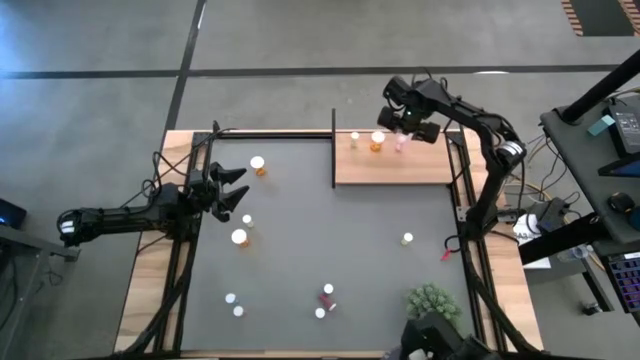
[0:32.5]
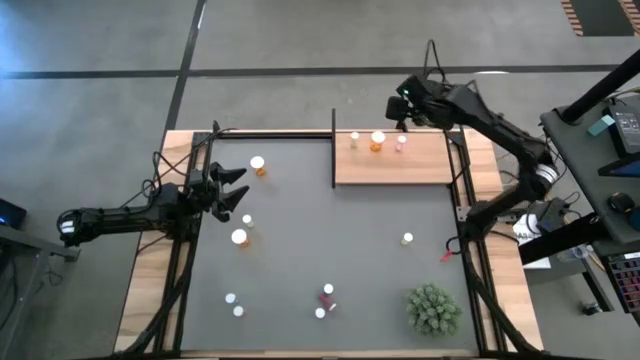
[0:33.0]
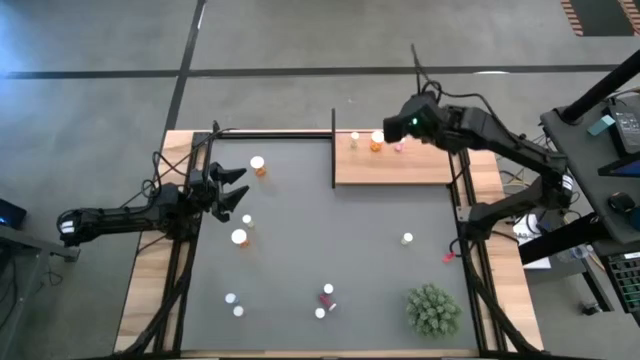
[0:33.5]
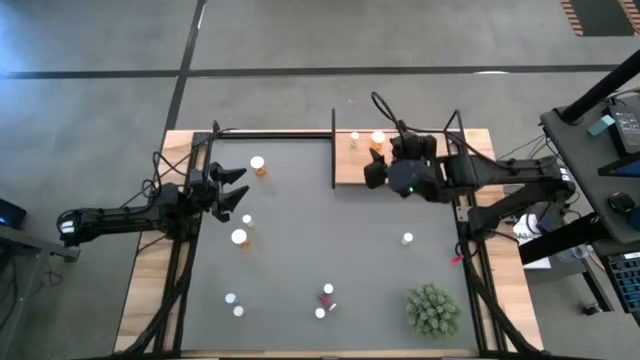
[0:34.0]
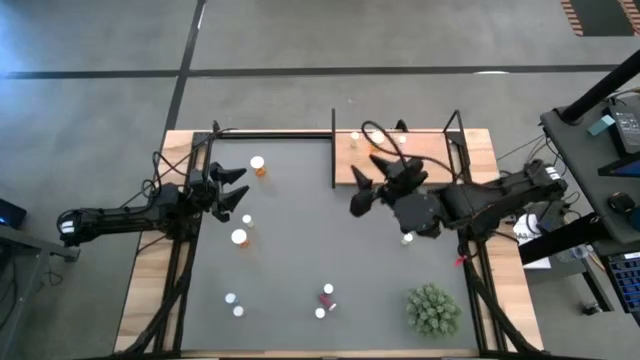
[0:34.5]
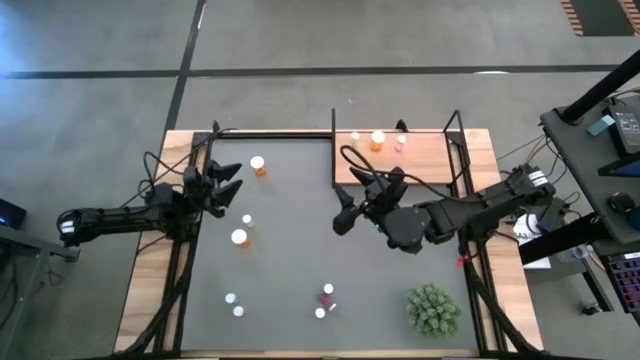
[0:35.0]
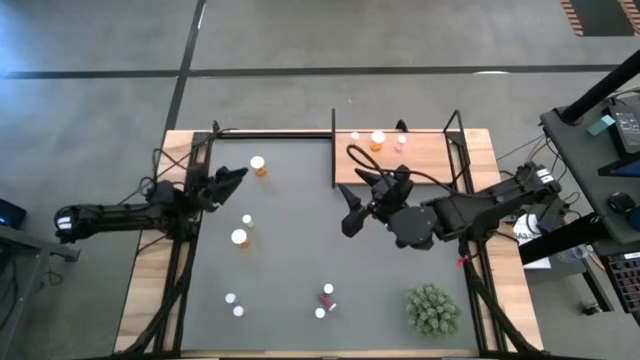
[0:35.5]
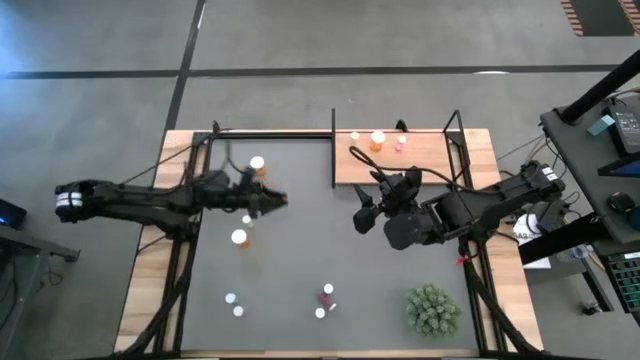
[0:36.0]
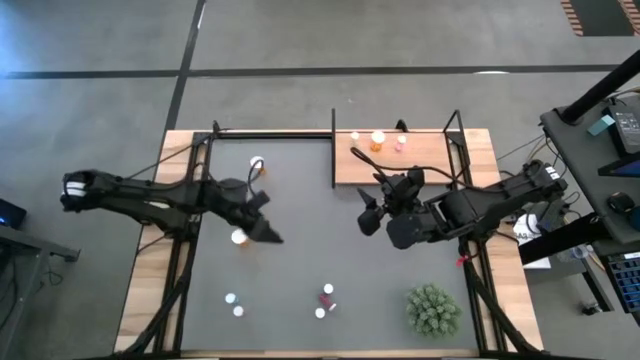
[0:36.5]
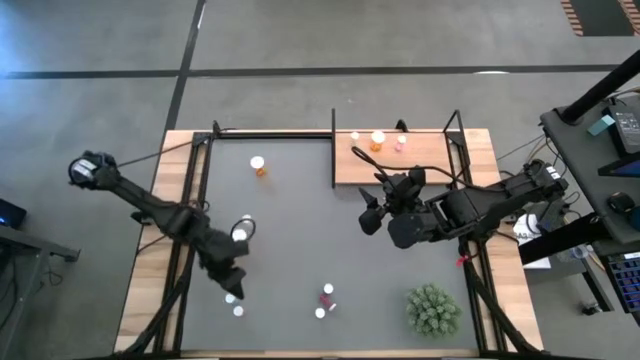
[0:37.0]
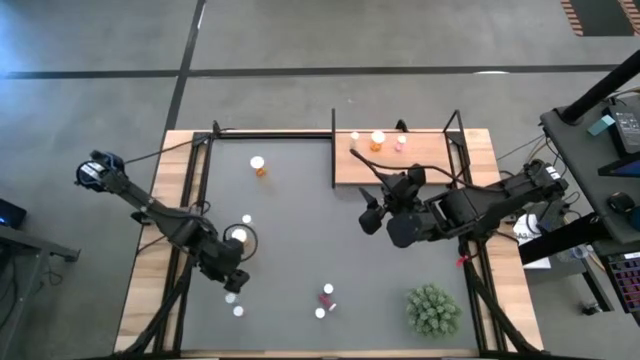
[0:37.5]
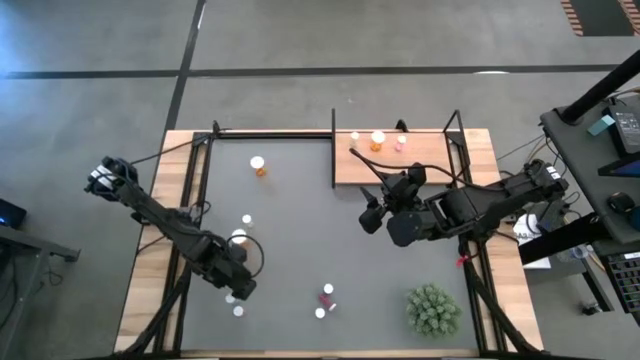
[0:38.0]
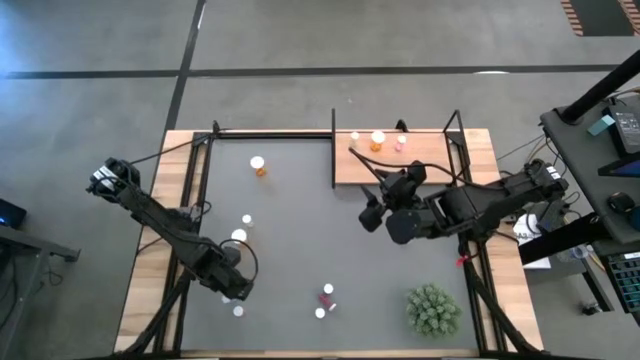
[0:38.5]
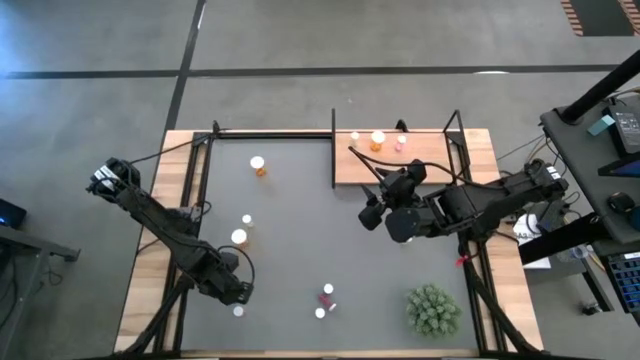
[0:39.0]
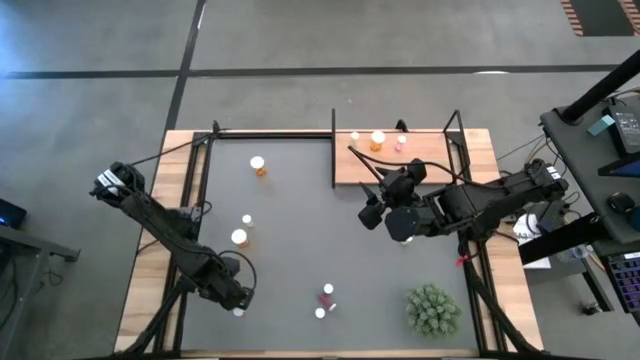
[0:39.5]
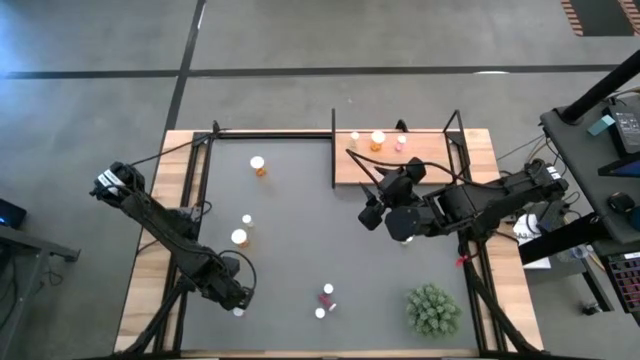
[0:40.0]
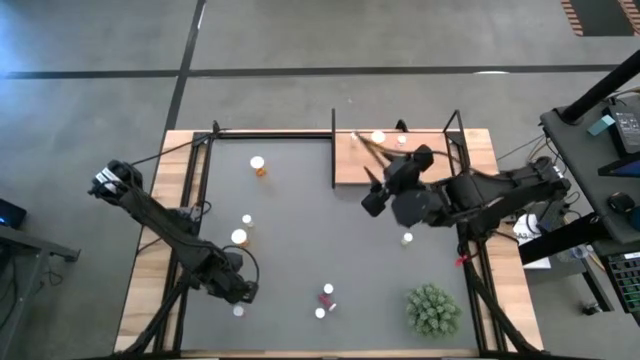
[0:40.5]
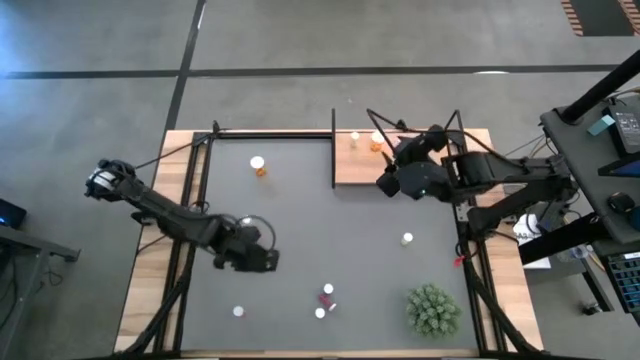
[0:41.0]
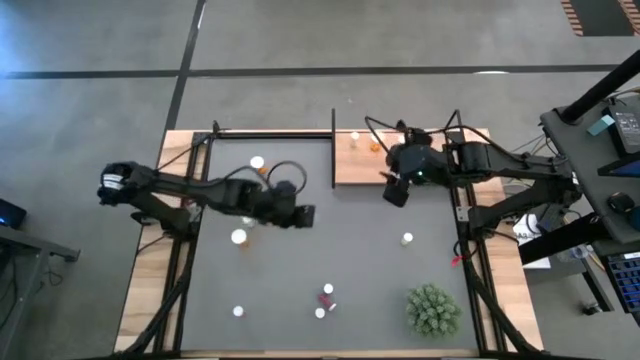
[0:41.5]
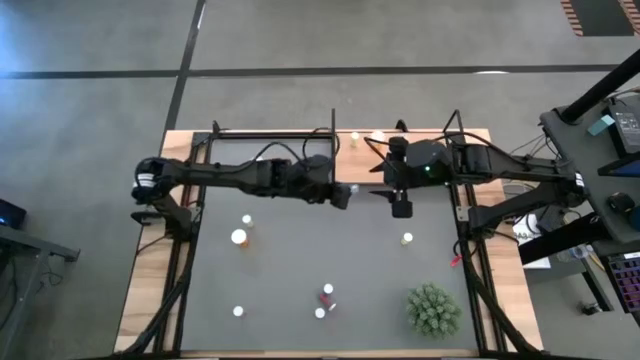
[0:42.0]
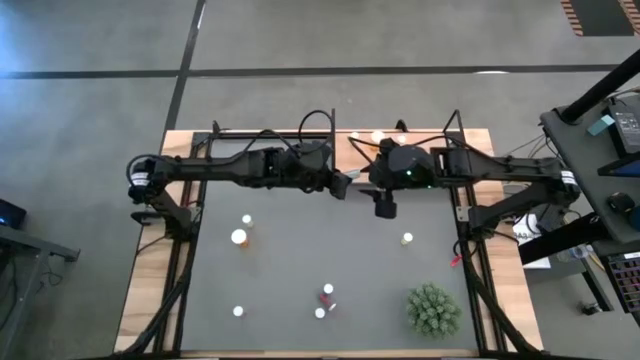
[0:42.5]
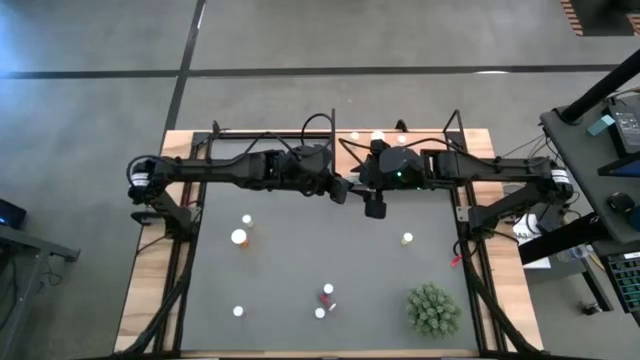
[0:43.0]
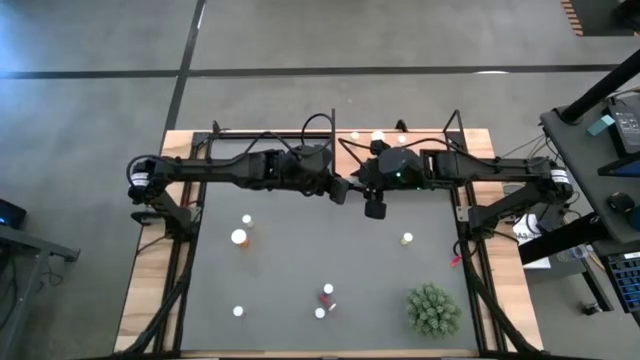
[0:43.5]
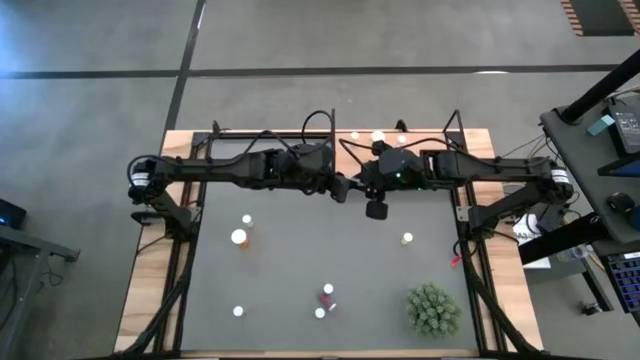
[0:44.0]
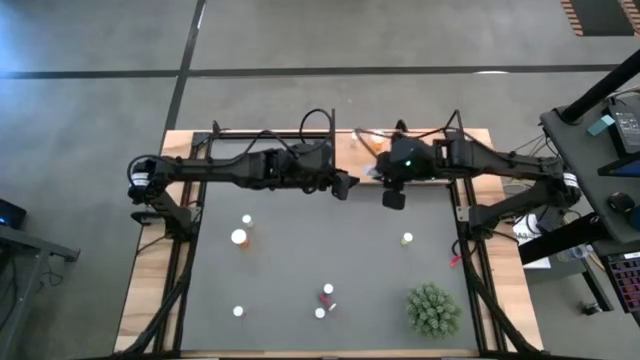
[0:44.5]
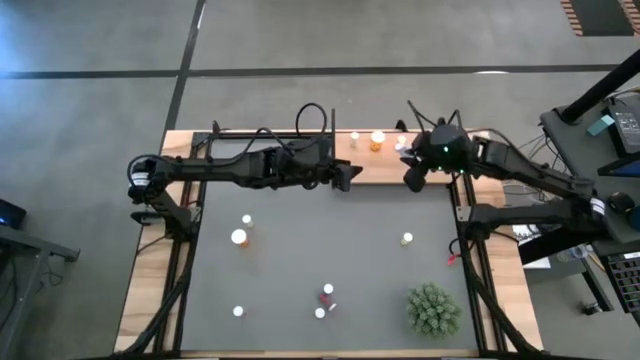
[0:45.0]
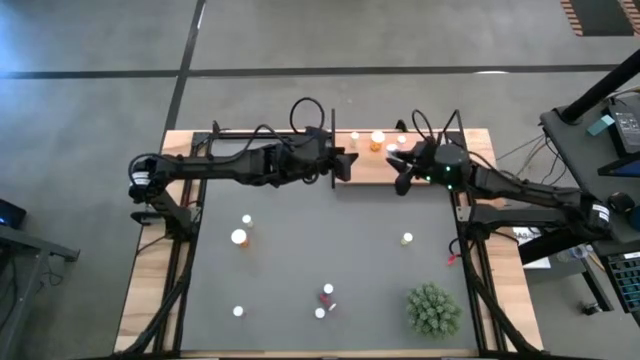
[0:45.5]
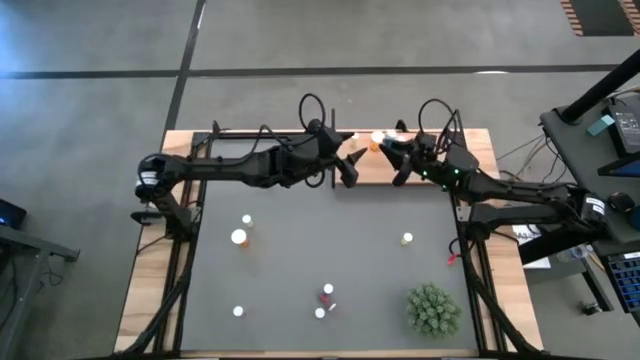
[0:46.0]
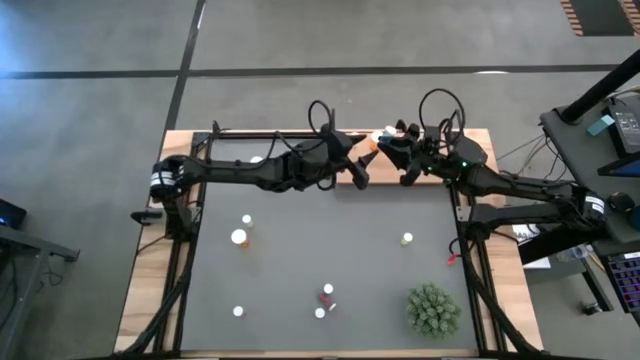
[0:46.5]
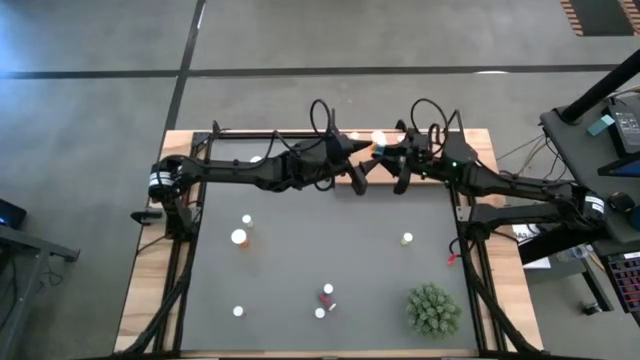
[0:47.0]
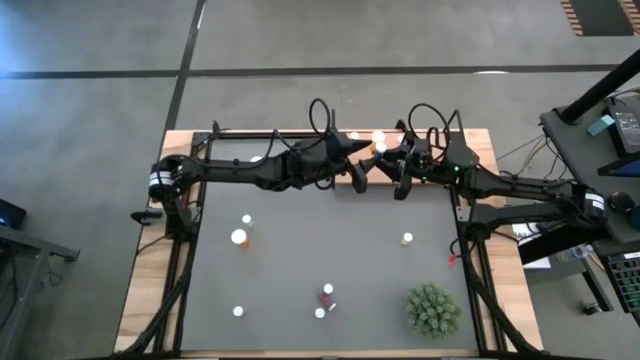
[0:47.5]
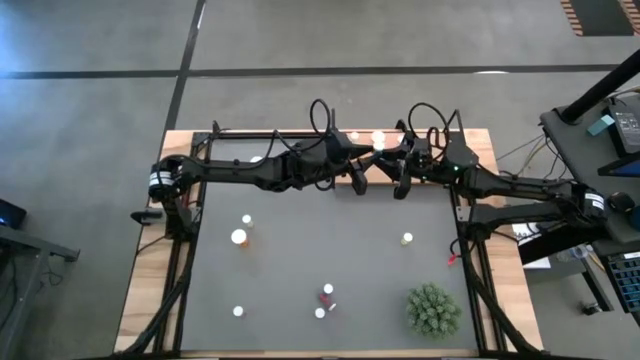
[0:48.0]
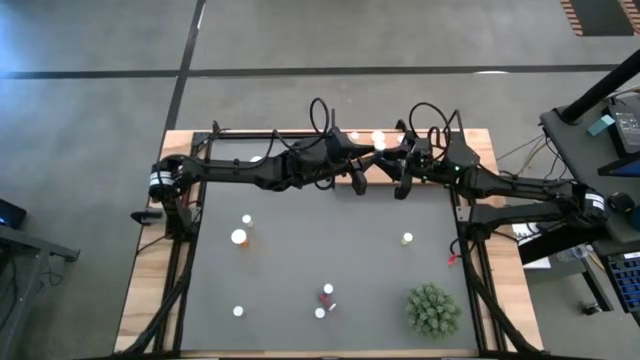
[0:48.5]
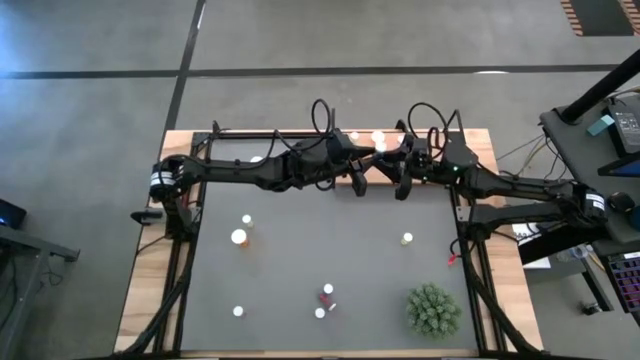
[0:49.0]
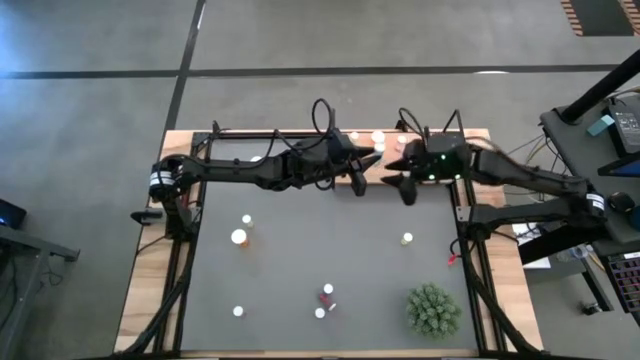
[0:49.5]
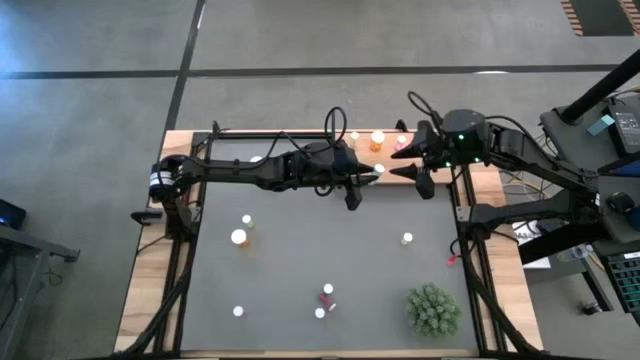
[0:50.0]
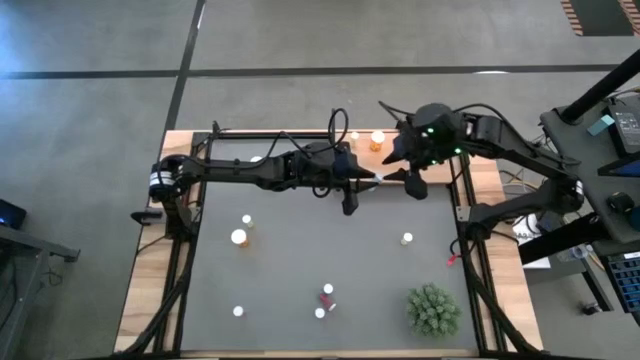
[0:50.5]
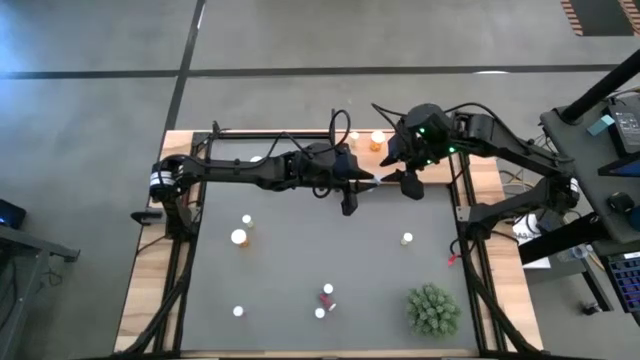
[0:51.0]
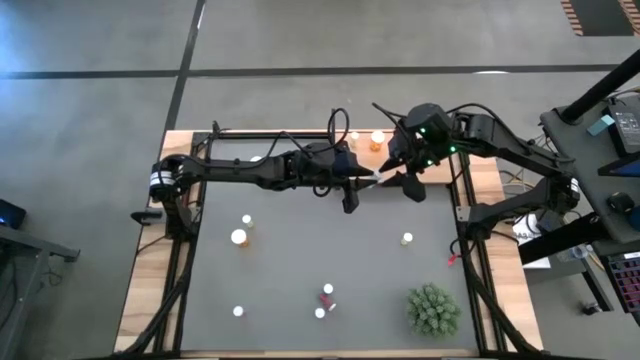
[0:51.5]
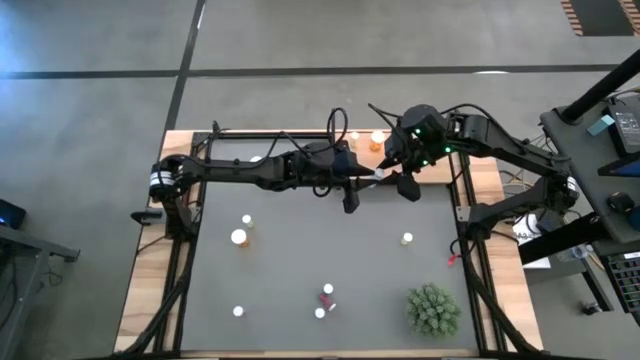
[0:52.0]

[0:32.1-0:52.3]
Task: Pick and place medicine bottles onto shelf by color
Put the bottom left blue medicine bottle on the shelf

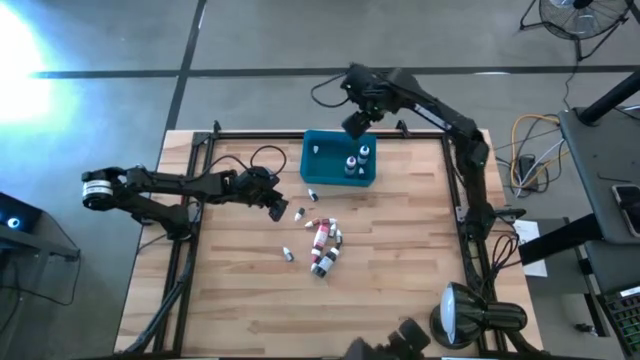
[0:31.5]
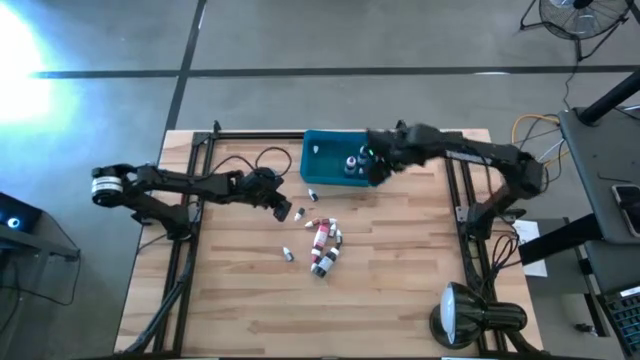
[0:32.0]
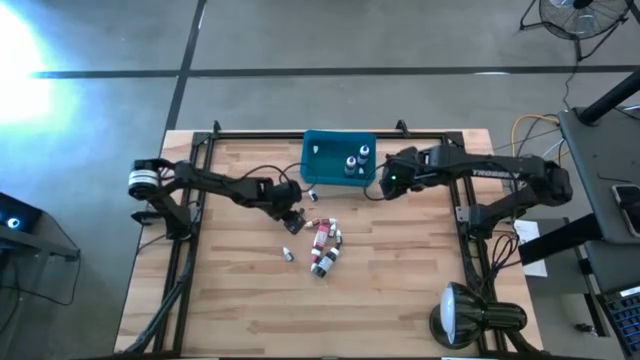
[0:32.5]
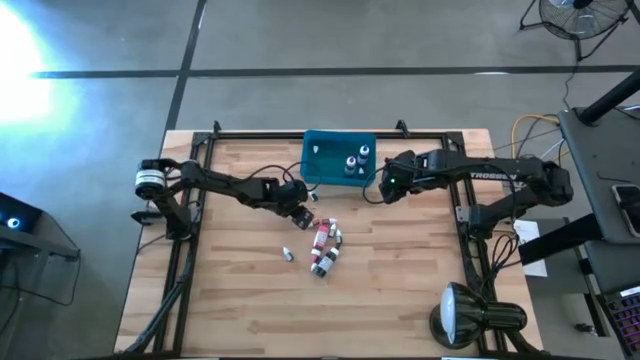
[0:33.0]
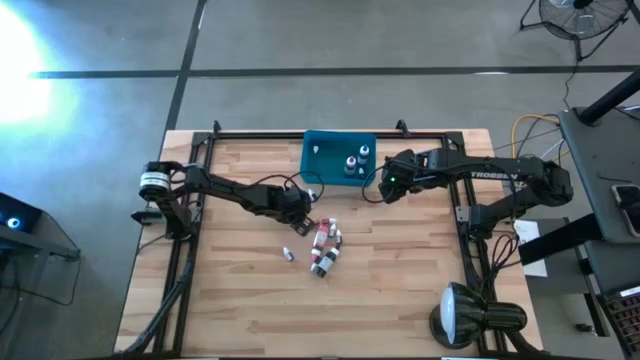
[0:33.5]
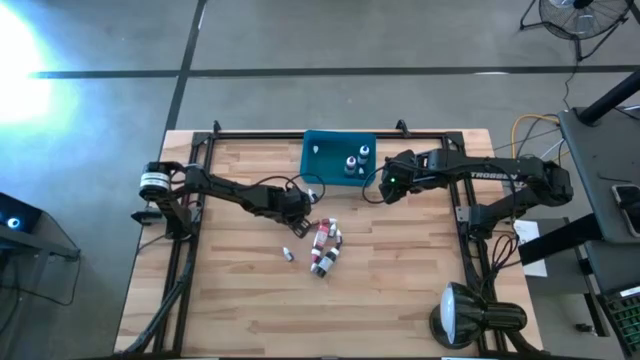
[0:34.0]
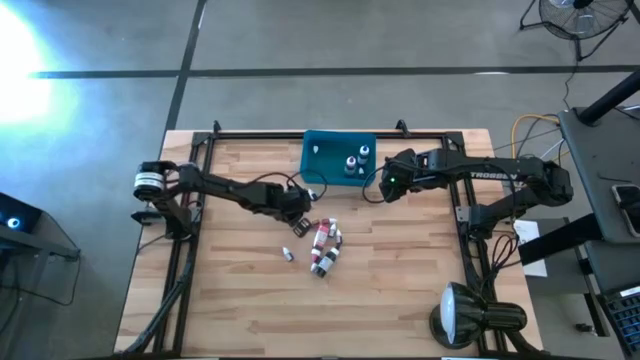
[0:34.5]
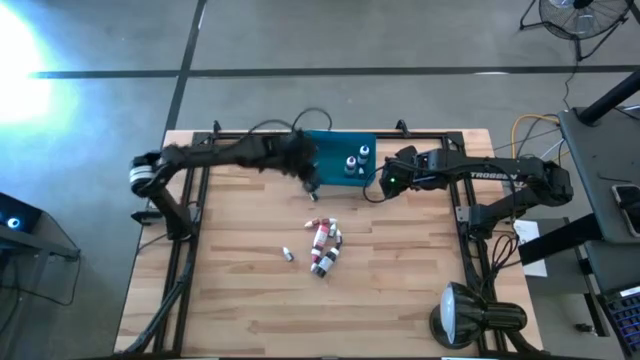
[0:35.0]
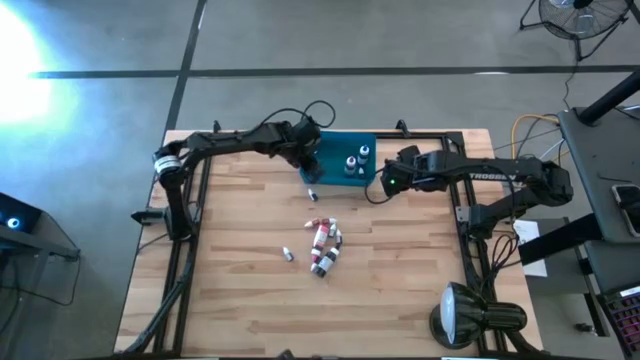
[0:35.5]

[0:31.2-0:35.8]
Task: Pick & Place food coloring
Put the small dark green food coloring bottle into the blue bin
